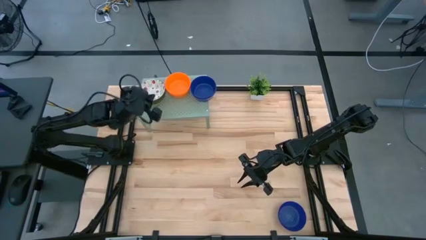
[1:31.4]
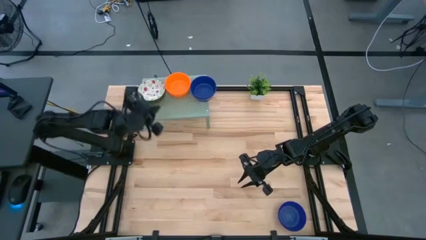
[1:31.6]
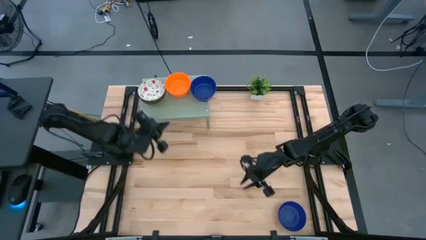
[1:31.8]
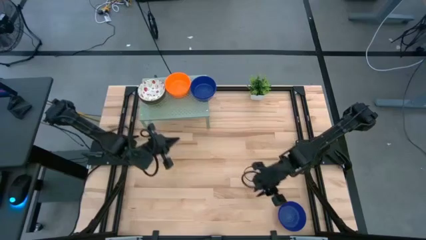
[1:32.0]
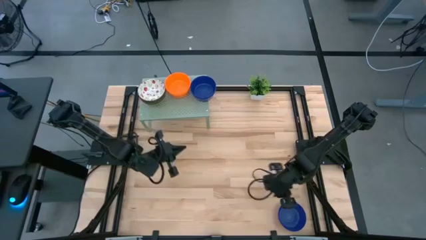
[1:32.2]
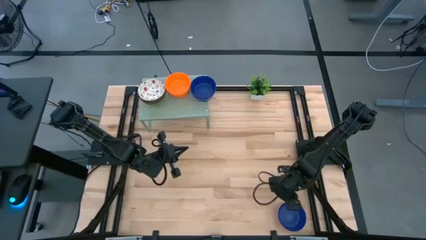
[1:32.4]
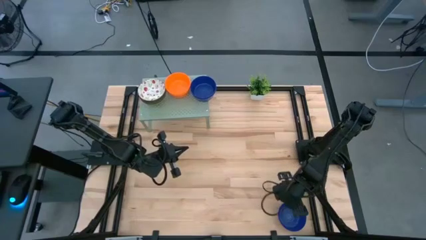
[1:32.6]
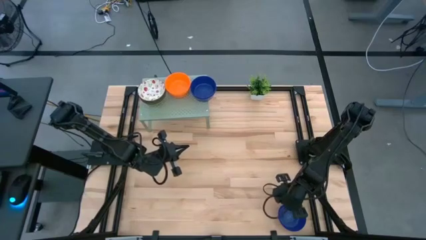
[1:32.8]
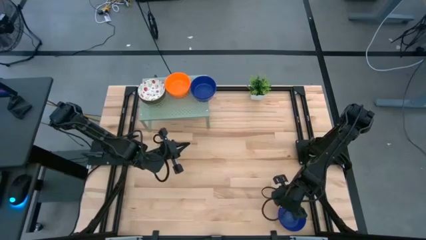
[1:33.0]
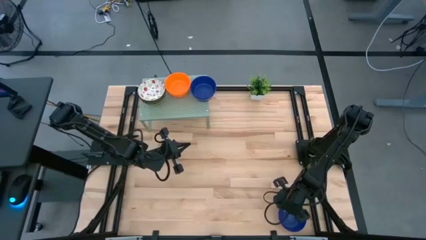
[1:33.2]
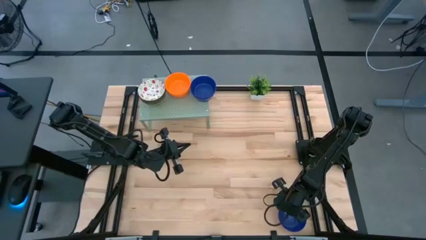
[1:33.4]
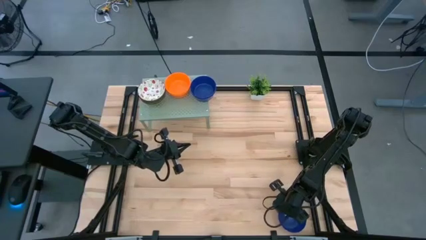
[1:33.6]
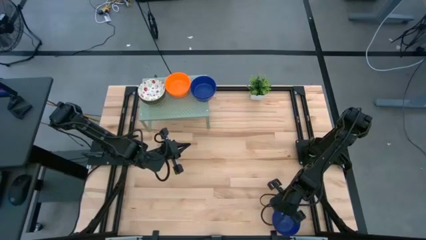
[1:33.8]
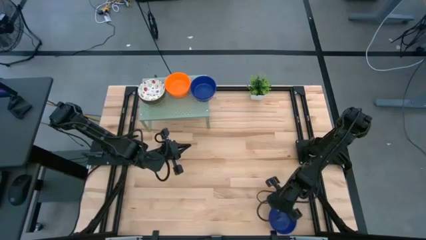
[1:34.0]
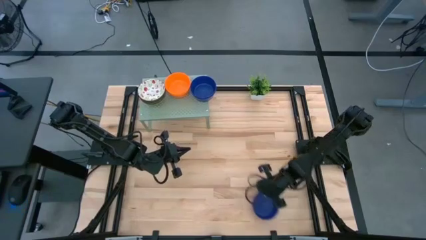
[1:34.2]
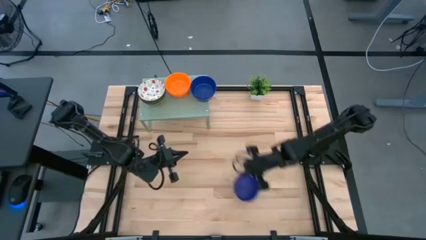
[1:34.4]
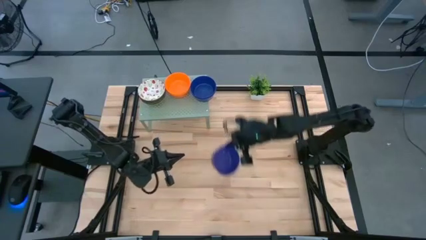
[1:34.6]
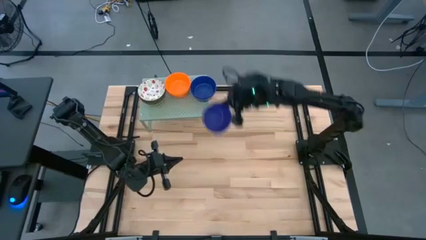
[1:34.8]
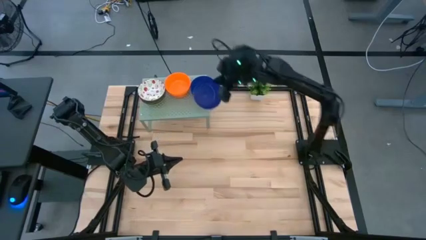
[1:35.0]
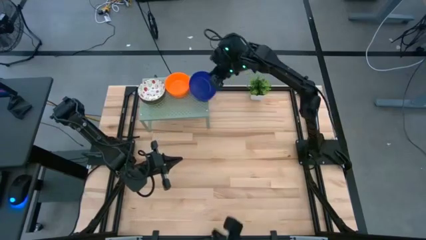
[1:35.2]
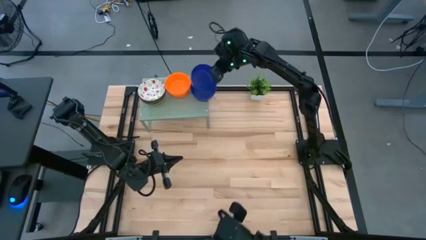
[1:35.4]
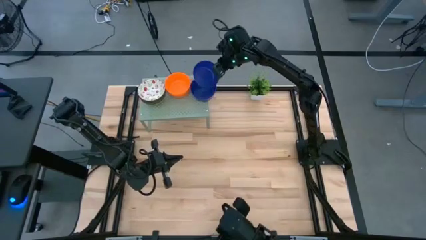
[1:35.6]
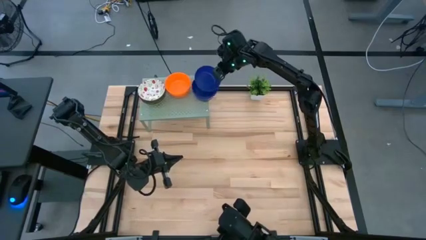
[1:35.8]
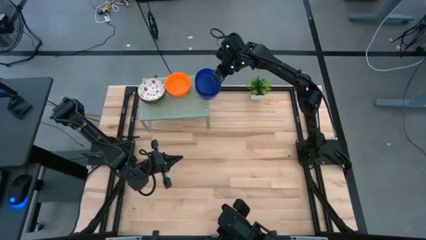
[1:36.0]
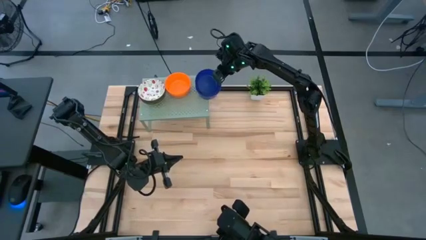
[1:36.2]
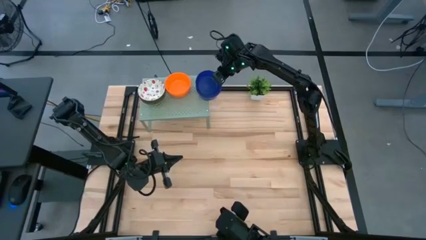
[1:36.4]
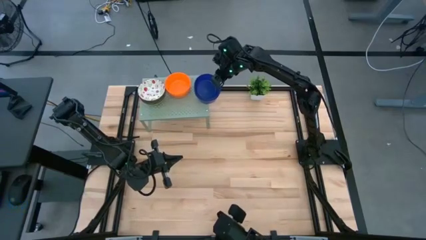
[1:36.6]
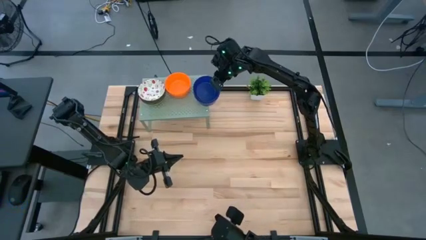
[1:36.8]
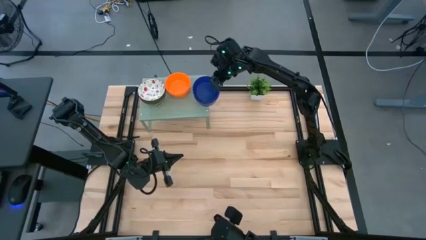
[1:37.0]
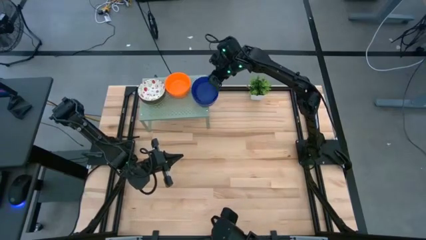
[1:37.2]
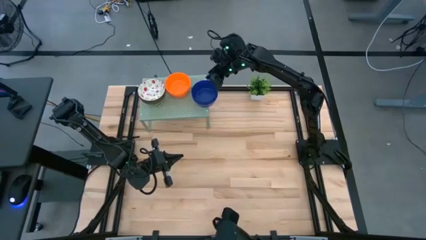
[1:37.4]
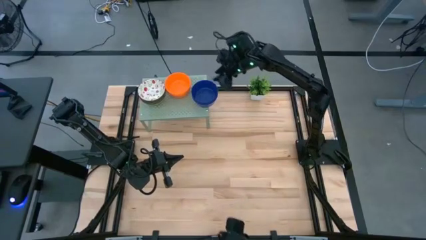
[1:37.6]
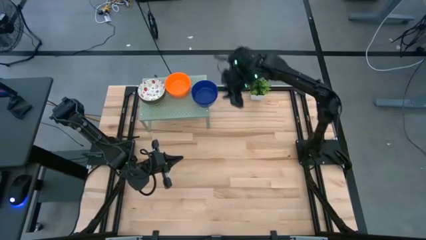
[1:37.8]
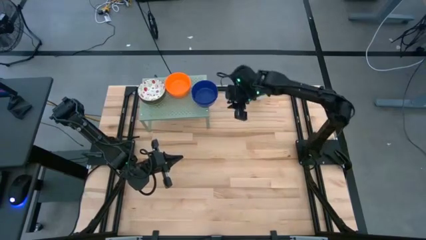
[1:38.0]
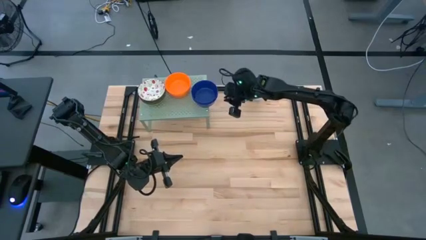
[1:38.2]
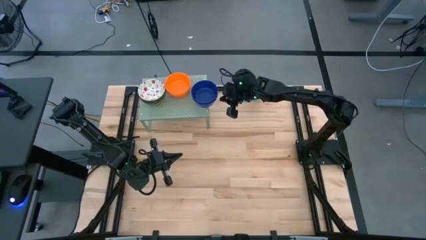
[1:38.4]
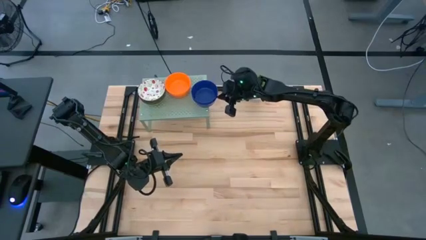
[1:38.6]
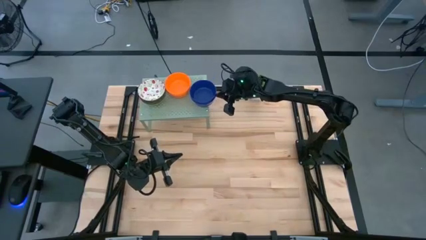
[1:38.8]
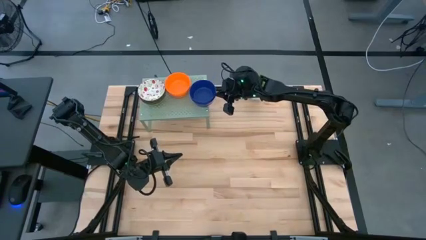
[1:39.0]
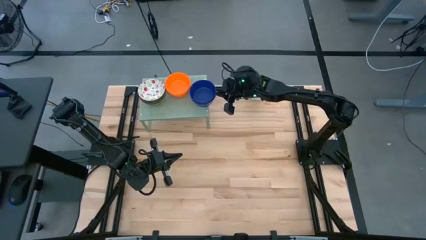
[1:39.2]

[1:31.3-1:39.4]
Task: Pick & Place Mini bowls
Stack the blue bowl on top of the other blue bowls on the shelf

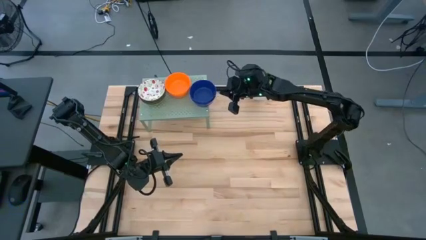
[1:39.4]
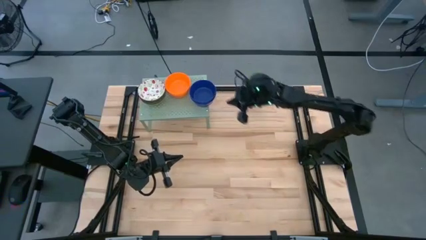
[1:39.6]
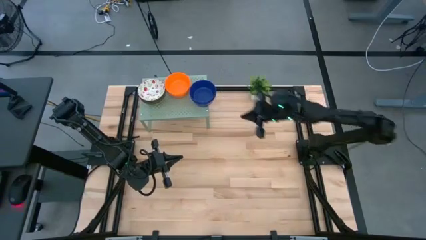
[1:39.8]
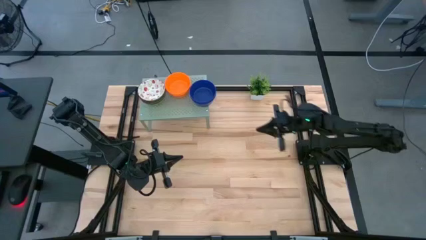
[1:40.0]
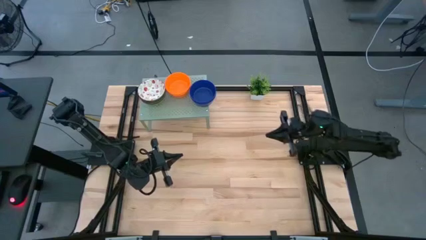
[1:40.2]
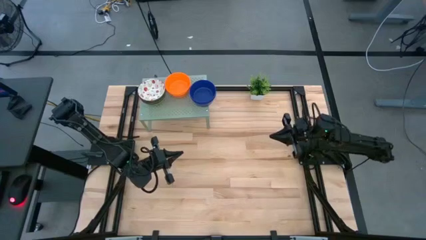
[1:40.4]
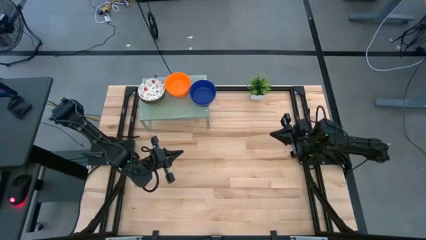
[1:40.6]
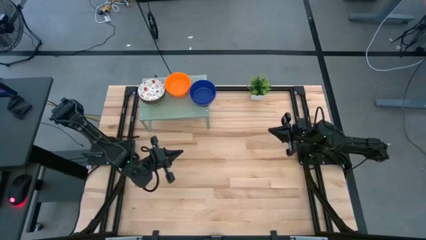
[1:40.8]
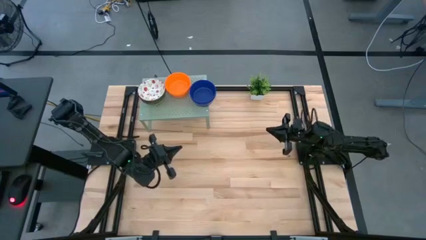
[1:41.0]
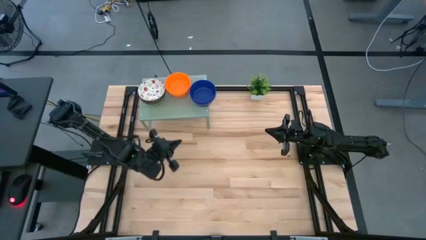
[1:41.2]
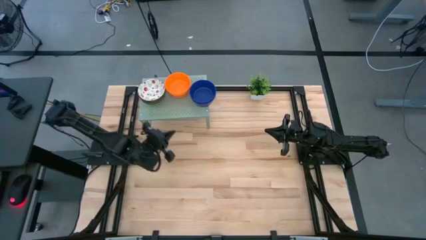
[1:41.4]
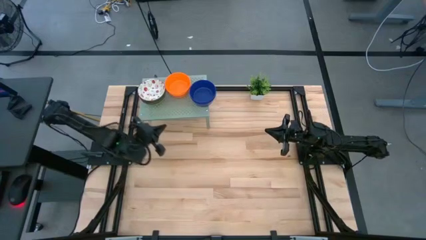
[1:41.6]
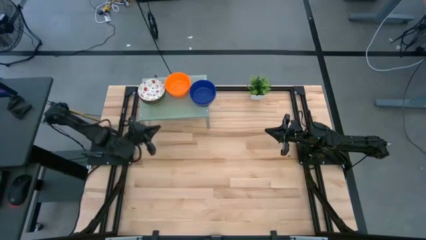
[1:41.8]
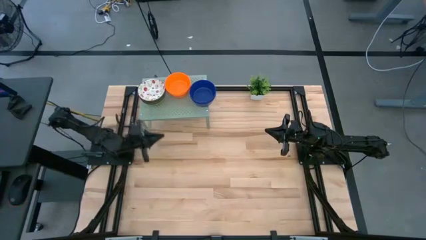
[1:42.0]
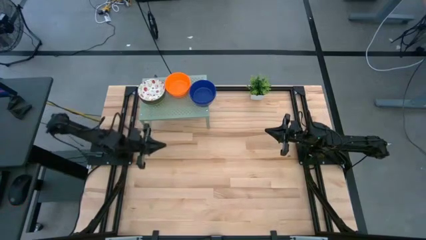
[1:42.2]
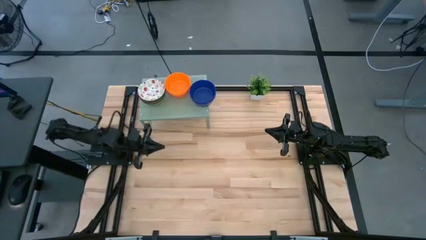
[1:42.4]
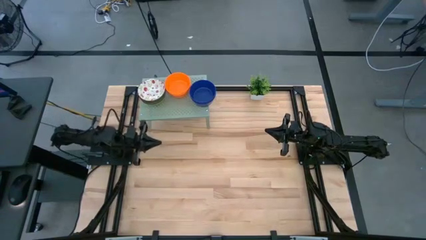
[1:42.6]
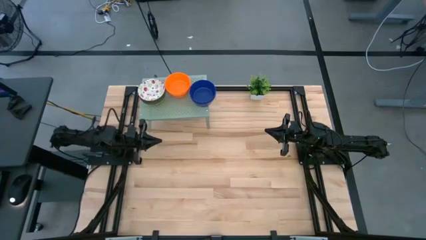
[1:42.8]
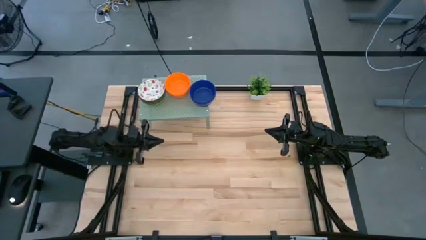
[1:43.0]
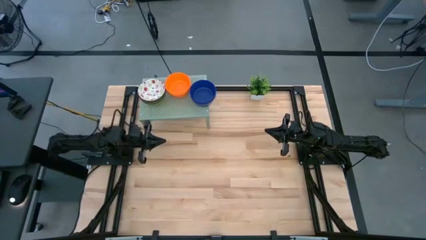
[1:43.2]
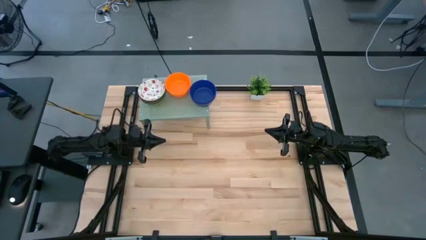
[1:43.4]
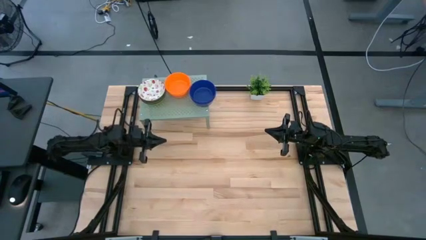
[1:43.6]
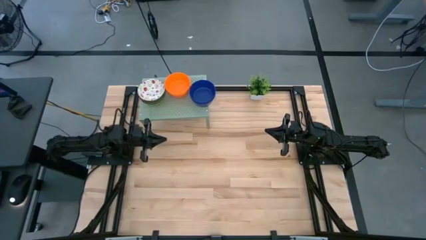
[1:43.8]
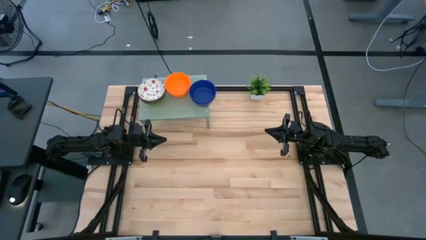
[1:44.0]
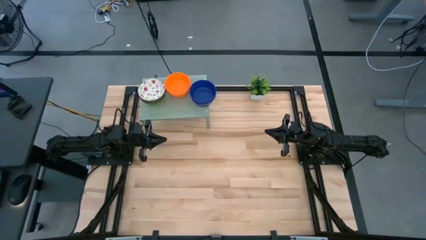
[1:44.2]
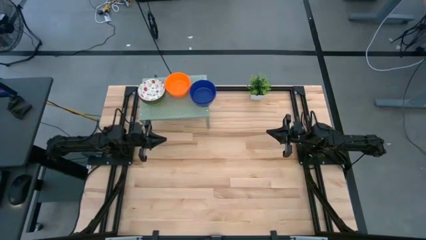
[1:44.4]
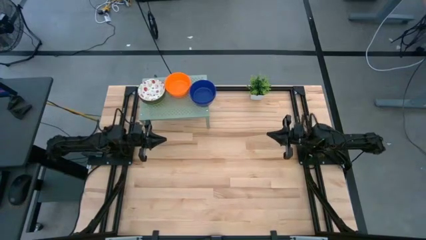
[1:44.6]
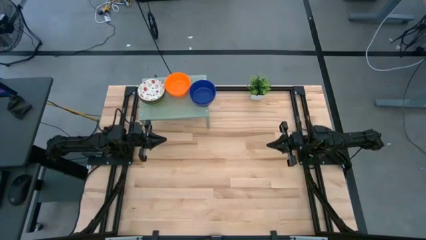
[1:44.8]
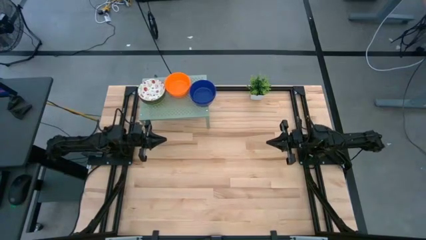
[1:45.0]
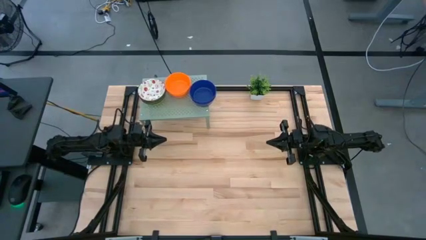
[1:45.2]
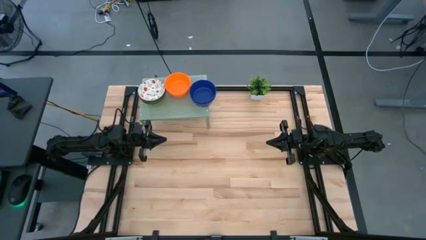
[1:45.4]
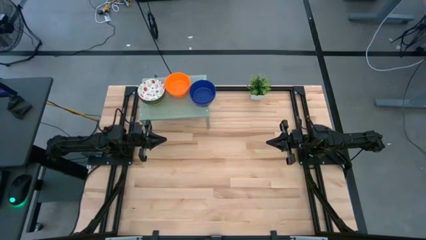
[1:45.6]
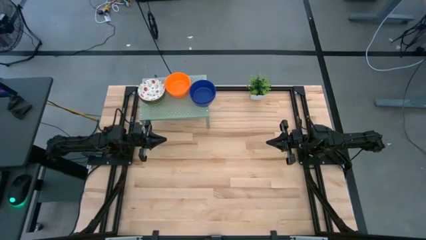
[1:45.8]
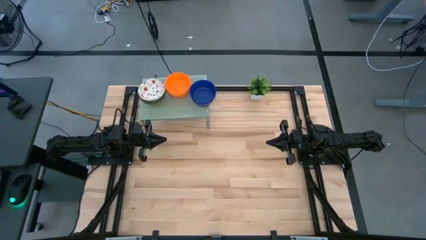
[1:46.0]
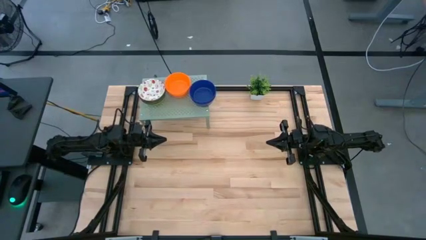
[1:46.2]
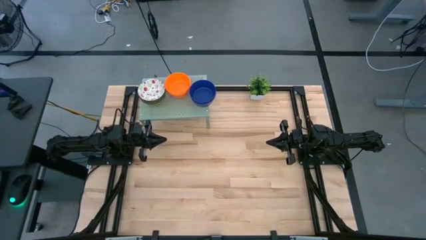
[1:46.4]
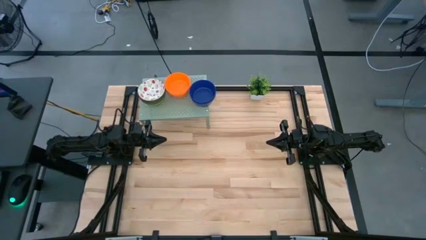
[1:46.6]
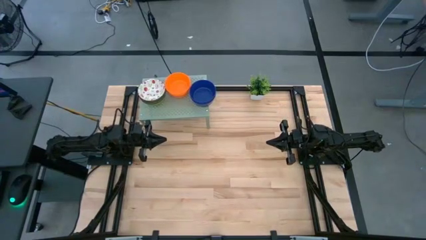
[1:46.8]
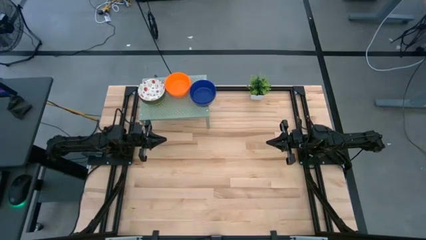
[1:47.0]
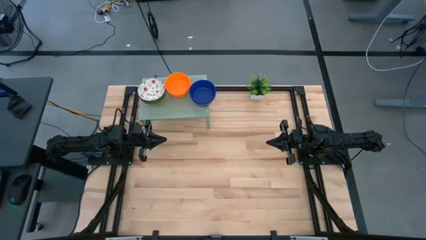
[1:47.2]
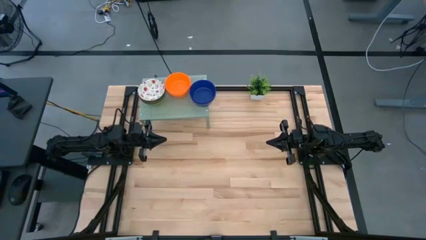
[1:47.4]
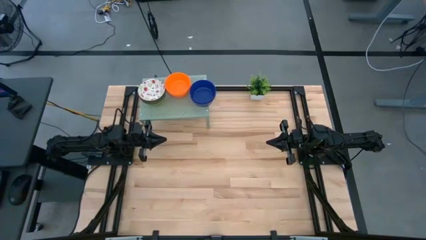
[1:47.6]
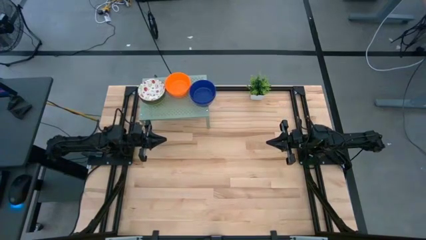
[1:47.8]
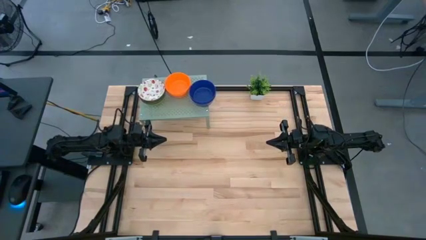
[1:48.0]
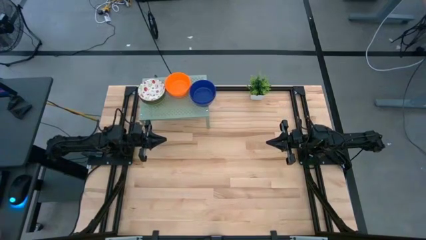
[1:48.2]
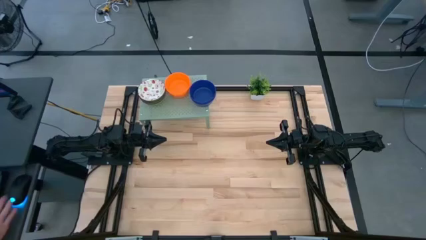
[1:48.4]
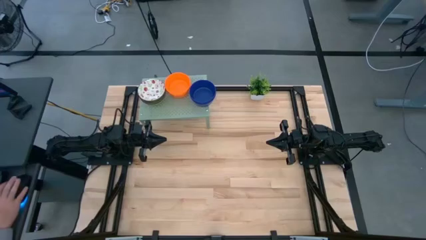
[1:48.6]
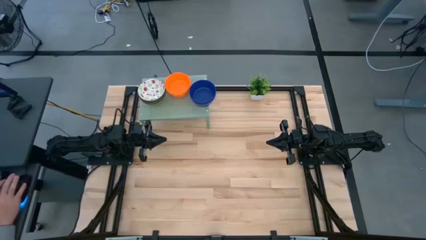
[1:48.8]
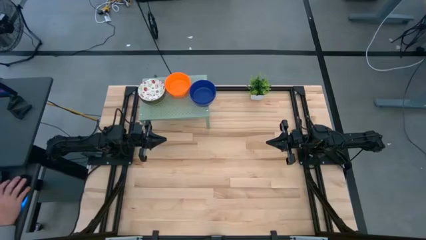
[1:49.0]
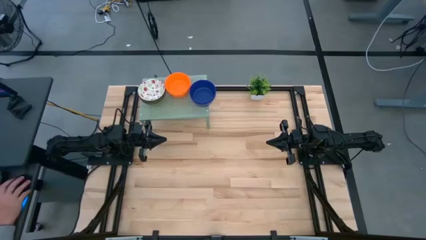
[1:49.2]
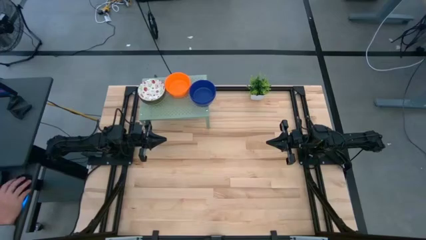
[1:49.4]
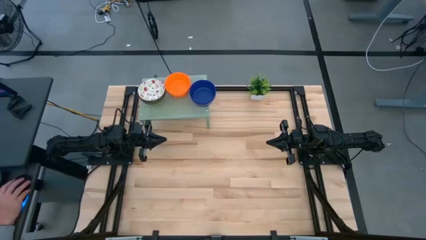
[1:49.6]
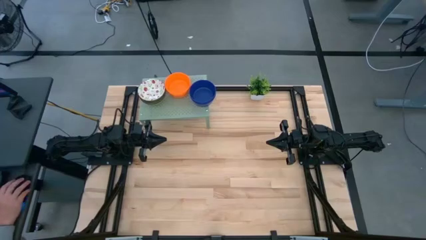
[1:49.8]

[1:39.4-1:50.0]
Return to Home Position
